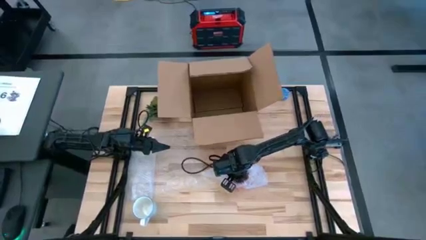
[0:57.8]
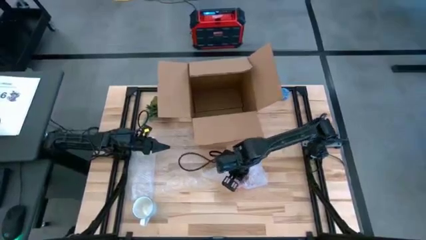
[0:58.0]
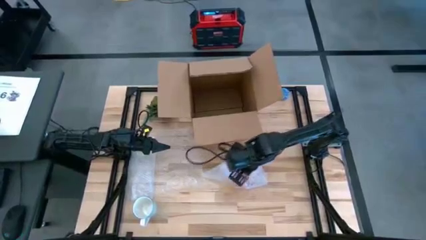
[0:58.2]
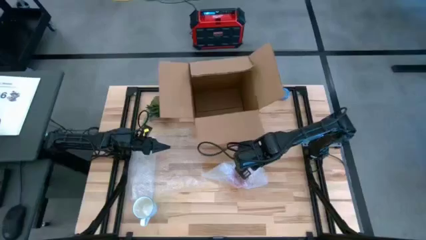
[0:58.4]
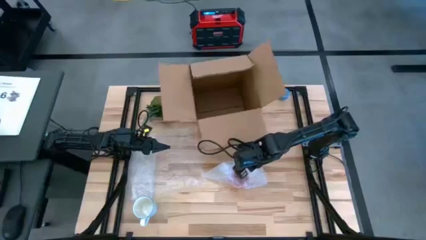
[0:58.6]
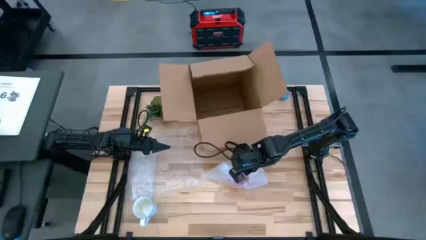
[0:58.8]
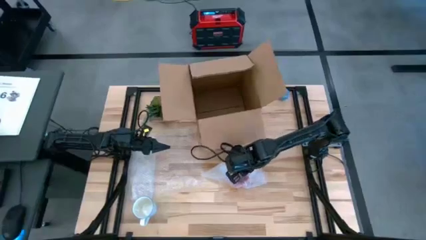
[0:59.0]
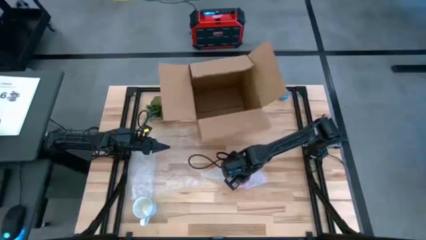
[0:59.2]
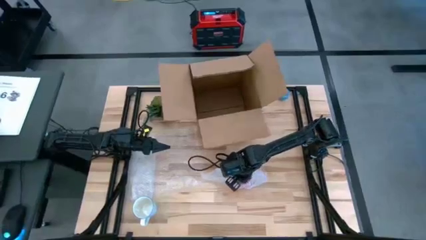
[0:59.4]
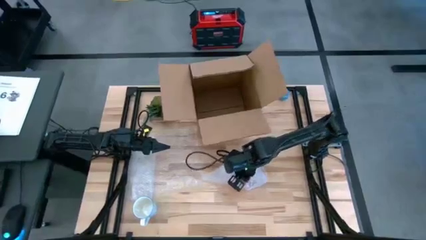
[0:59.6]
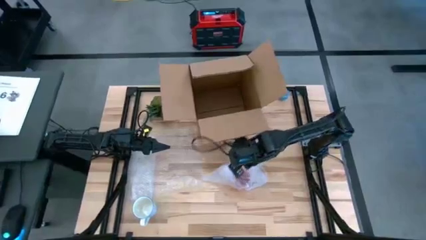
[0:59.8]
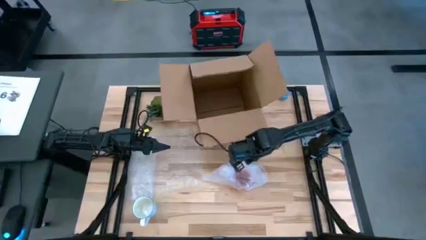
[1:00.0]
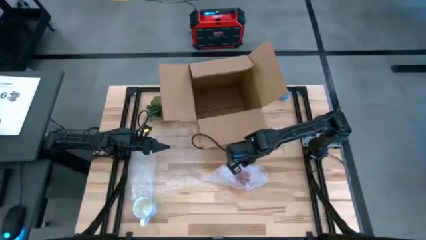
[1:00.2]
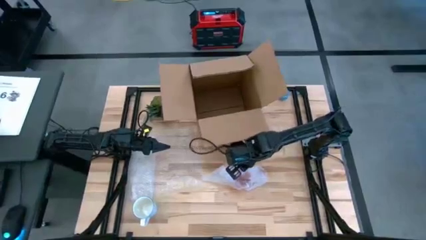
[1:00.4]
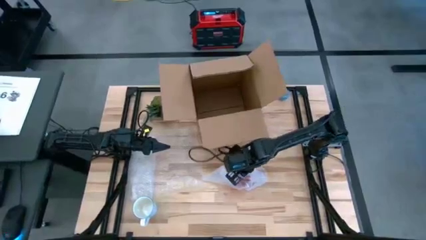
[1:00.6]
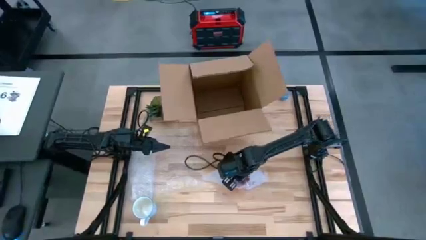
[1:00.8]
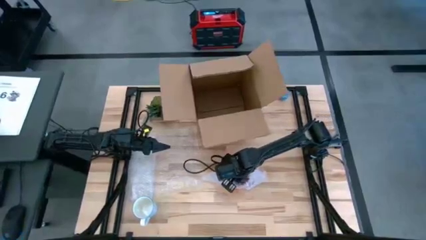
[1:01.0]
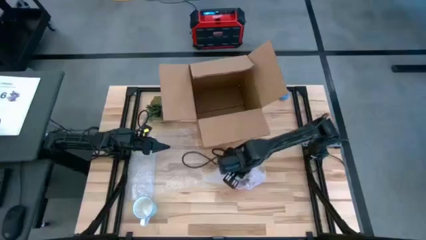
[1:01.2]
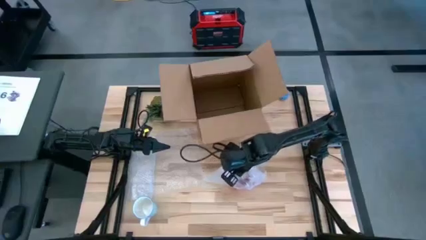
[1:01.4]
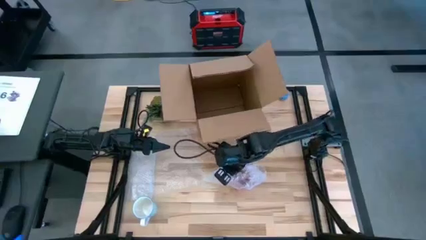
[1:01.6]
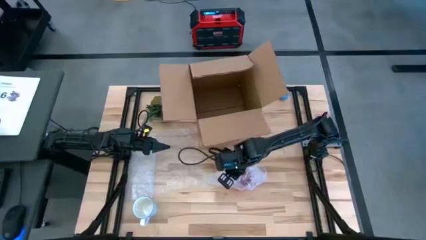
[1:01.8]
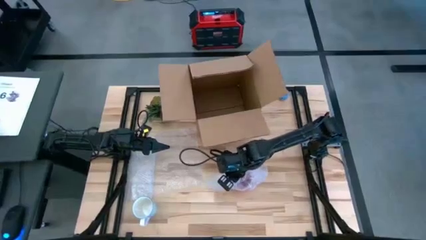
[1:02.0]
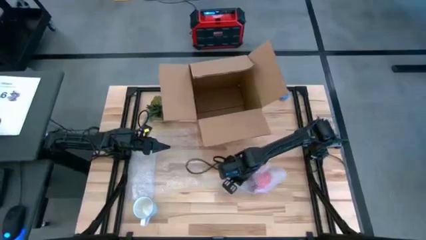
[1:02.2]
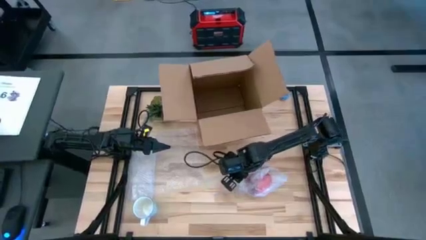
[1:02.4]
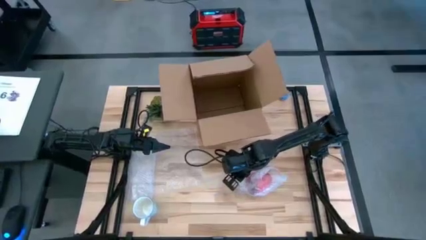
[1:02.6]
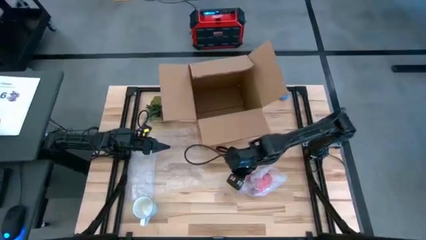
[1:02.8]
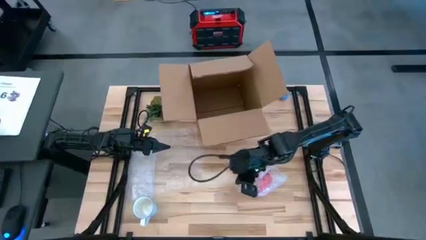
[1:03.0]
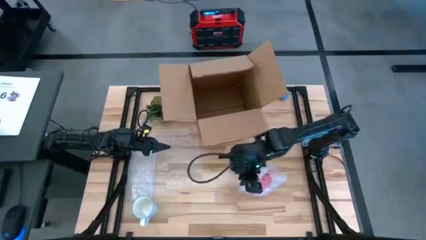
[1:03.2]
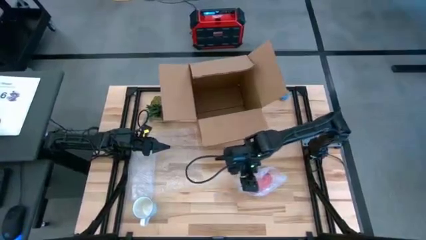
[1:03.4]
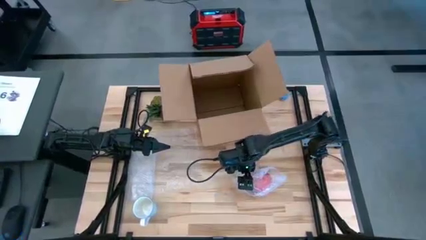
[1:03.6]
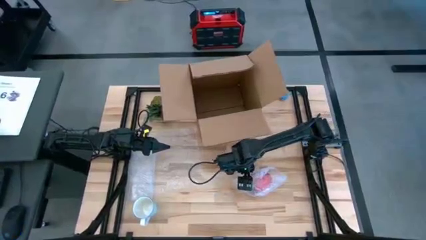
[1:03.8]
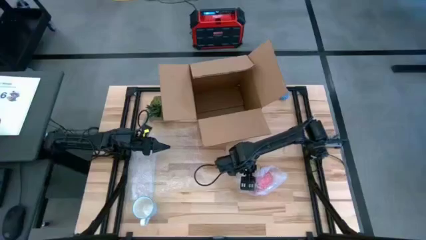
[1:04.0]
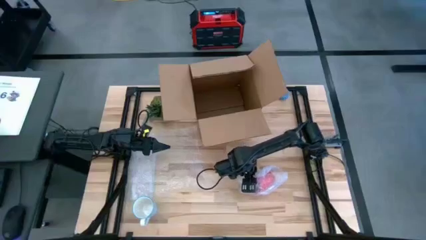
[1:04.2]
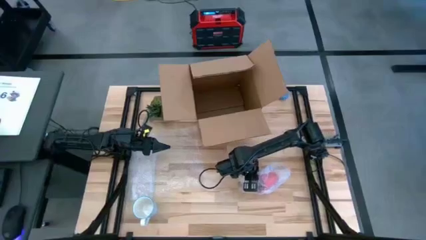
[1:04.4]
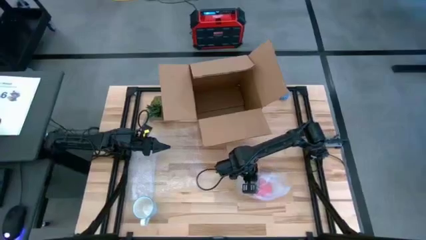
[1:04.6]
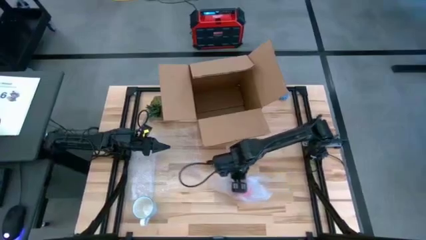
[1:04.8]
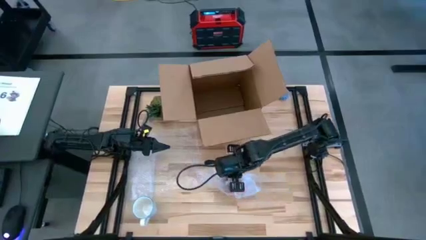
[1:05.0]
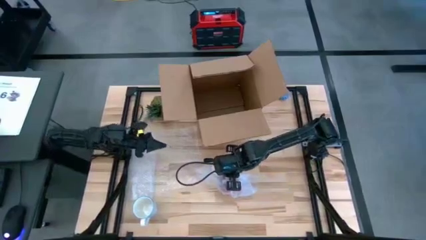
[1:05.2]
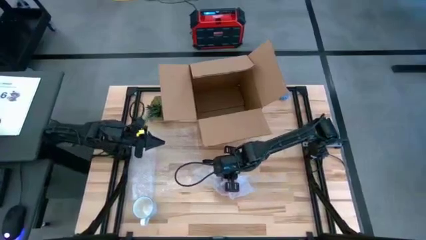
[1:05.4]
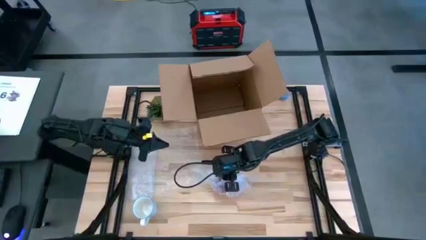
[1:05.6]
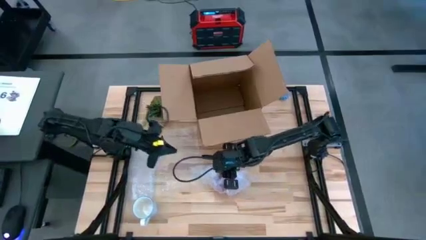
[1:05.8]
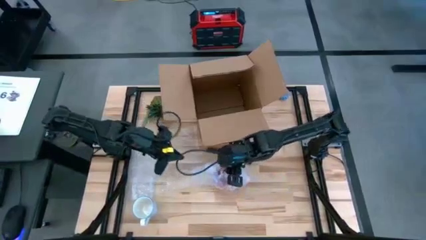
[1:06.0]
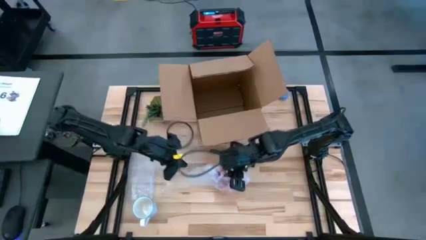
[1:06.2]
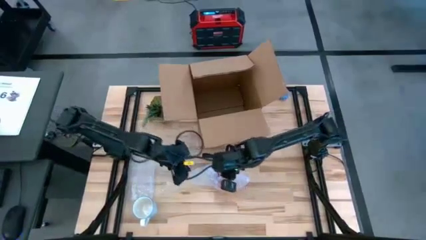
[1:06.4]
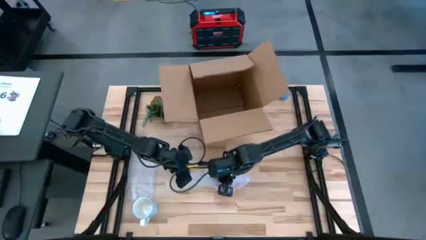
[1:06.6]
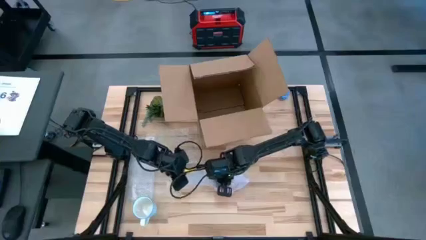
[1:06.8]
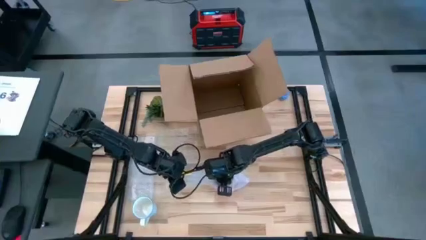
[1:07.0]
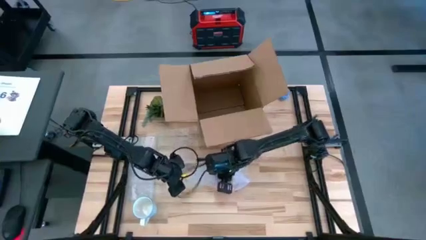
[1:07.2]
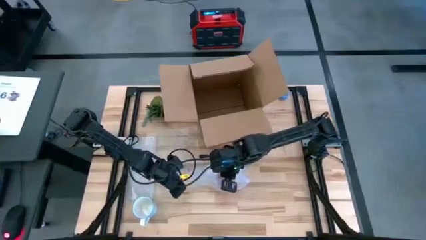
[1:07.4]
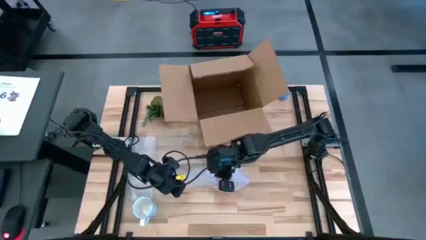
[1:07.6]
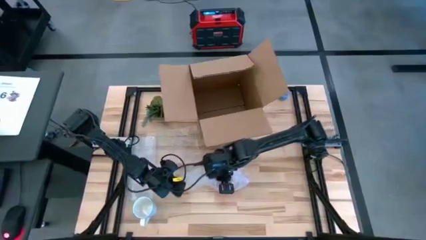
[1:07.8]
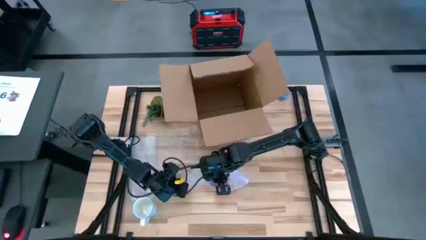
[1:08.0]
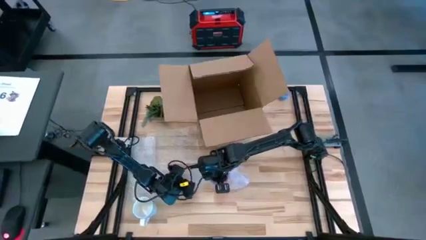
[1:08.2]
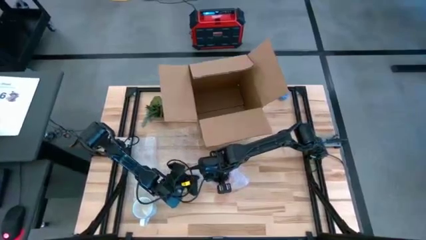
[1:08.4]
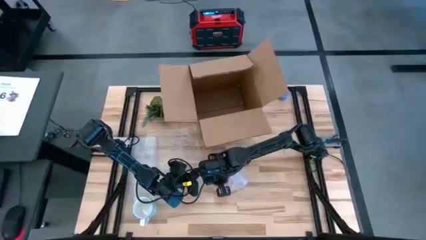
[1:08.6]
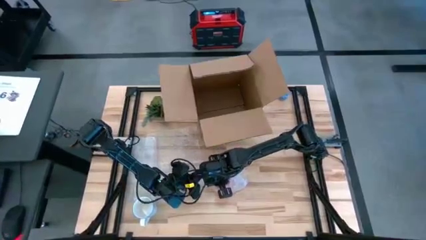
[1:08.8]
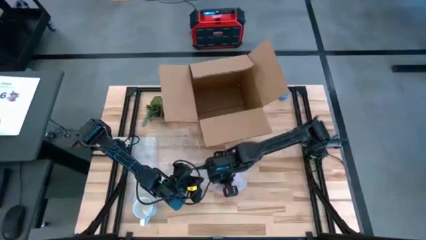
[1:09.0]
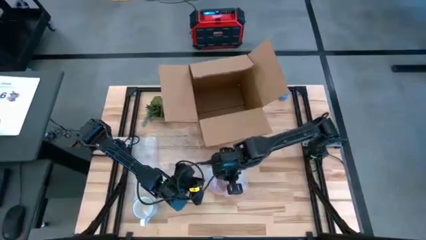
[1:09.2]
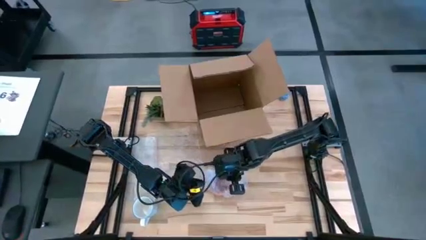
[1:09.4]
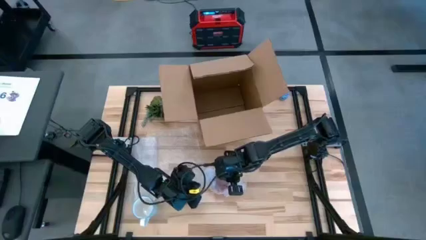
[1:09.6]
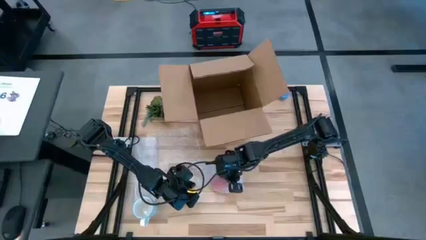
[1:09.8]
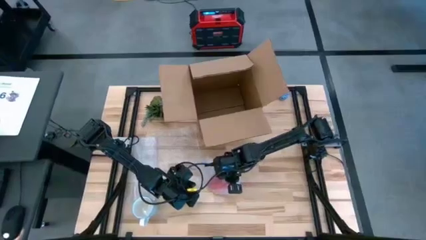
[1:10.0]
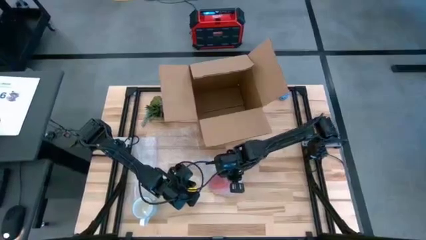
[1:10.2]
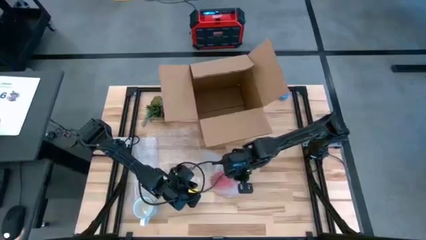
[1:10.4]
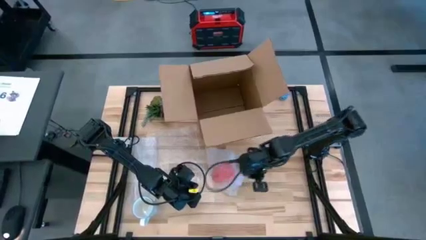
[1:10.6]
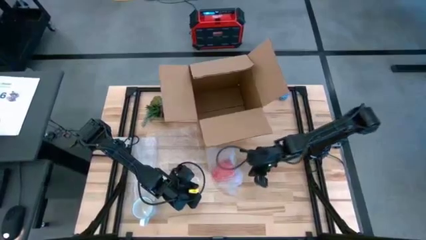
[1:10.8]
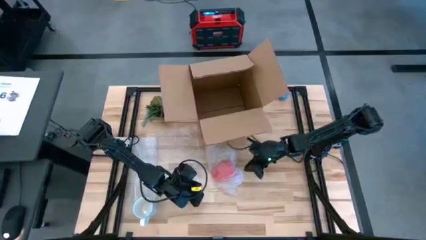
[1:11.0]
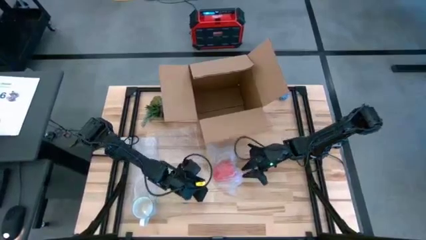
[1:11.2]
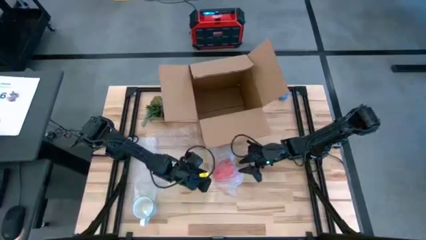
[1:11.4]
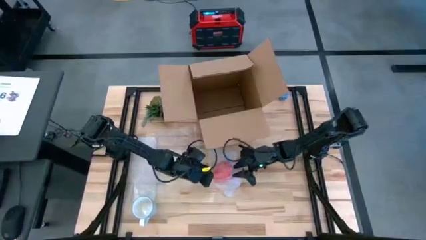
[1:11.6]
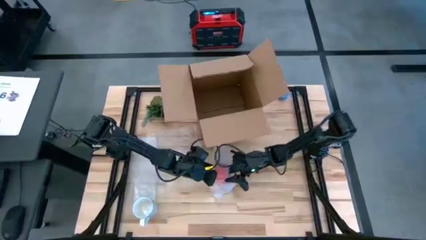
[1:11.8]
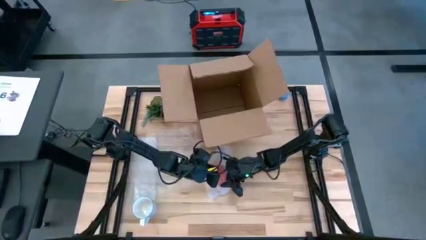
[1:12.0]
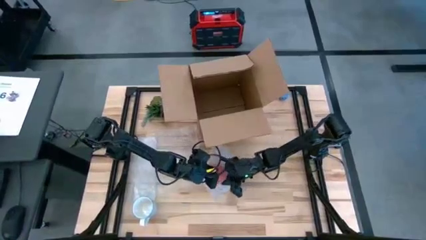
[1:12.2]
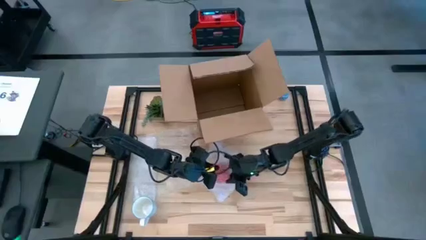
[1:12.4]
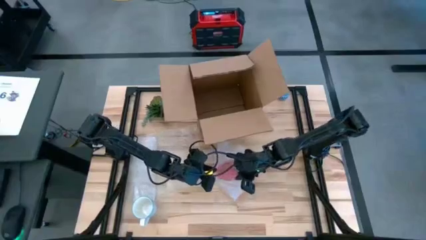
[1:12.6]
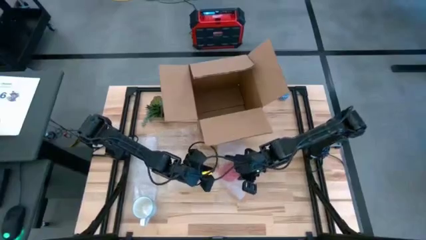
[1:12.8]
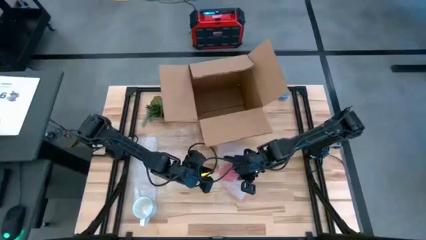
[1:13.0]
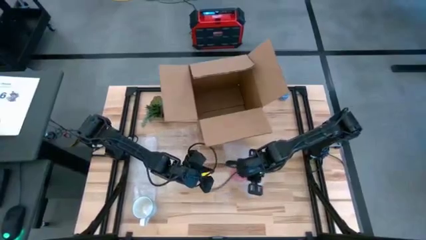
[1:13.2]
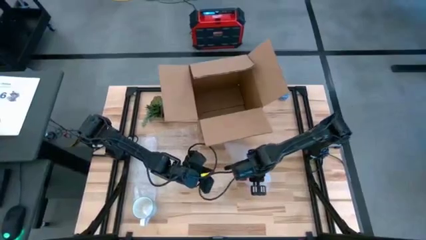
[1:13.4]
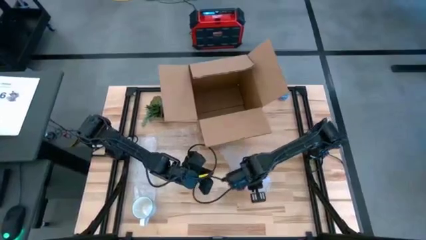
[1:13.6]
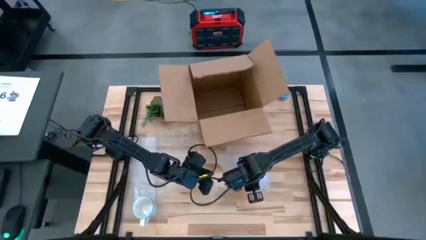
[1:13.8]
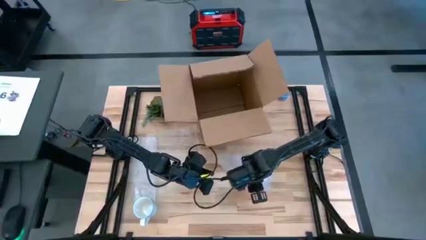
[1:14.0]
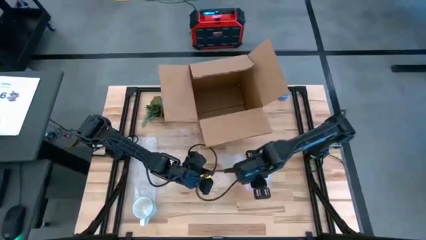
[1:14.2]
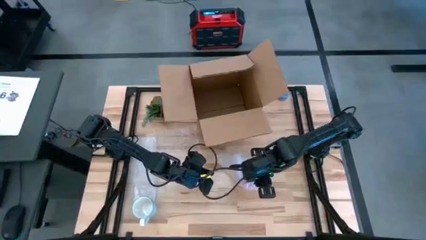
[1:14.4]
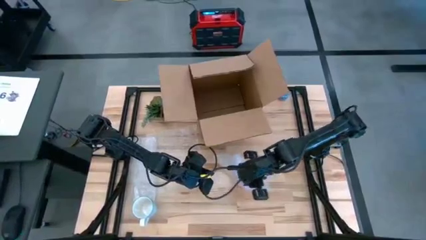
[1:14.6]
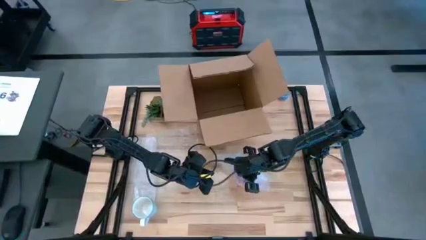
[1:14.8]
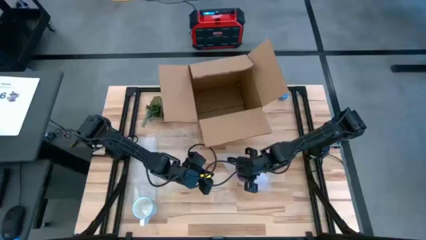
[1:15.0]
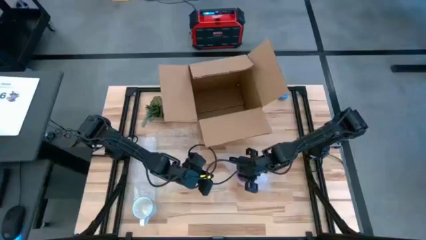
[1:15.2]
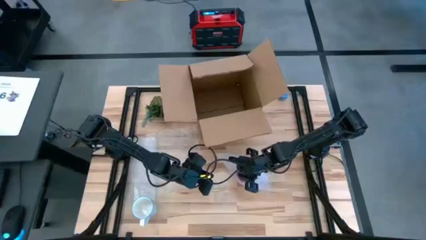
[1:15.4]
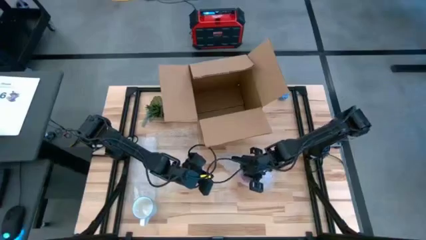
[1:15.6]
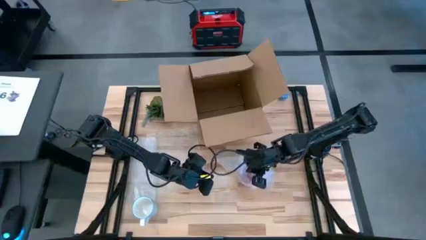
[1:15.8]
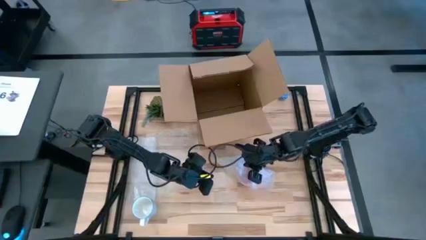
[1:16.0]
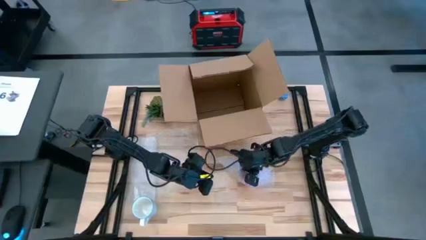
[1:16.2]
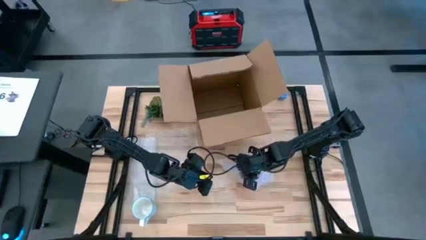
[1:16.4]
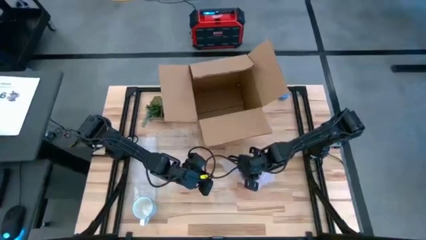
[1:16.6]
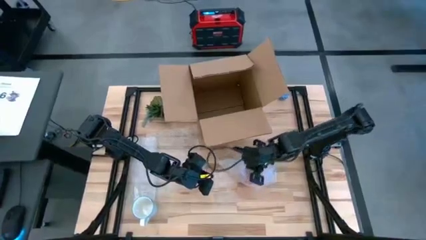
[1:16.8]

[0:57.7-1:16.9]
Task: wrap mug
Wrap the red mug with bubble wrap
